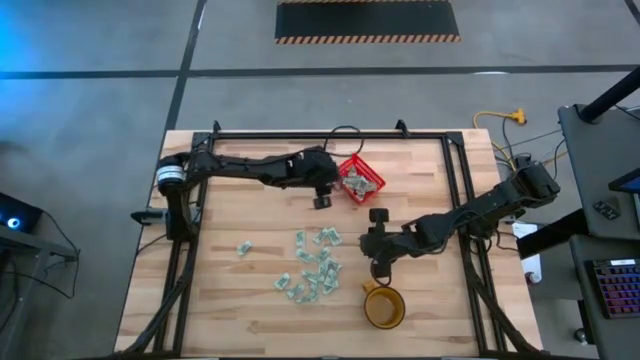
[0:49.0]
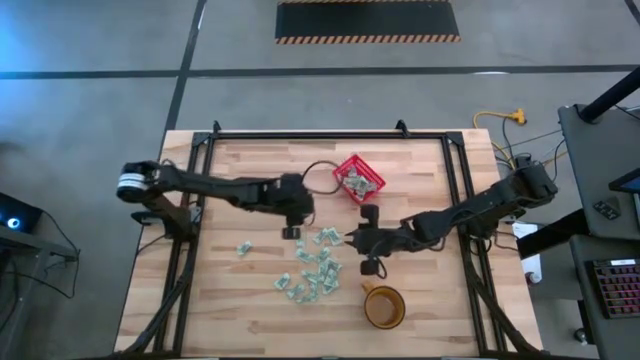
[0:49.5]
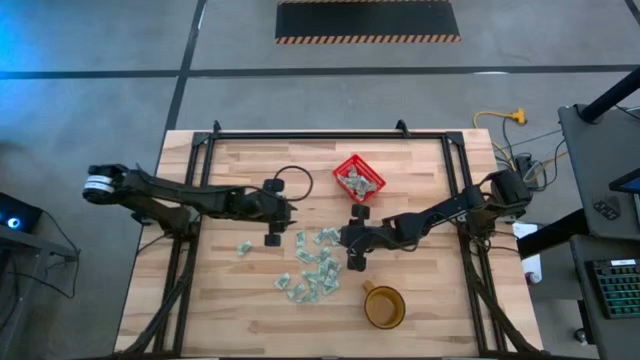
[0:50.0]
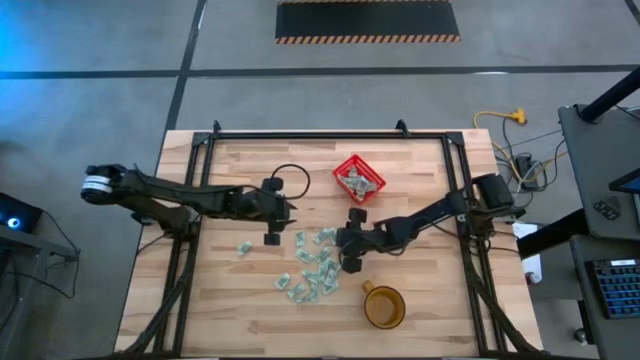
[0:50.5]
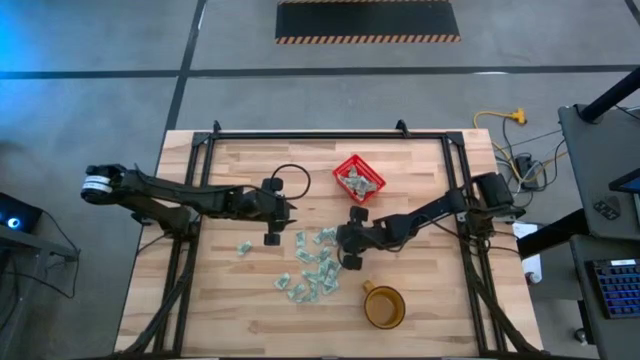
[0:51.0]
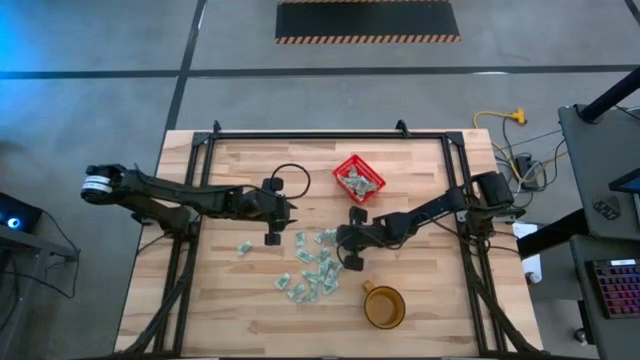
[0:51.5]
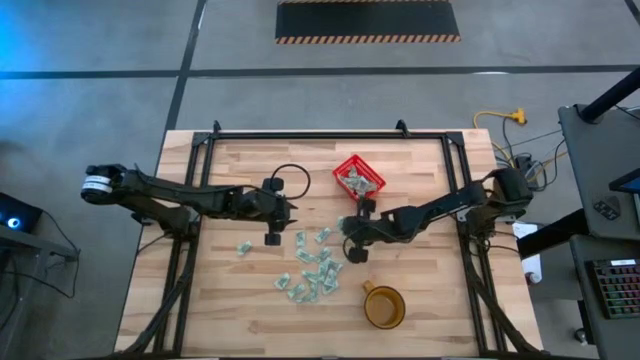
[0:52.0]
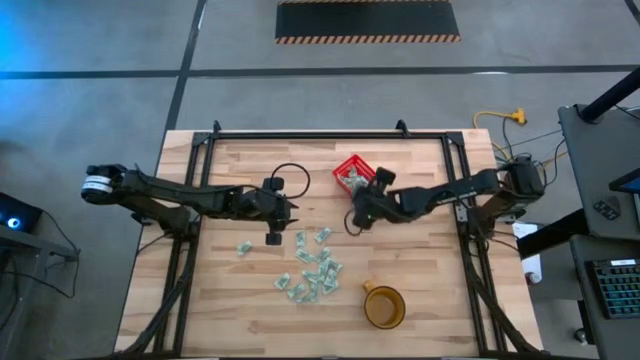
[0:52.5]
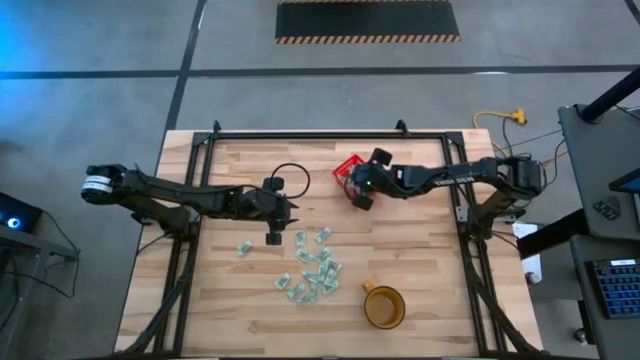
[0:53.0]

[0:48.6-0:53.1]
Task: Pick and place Stevia / Truvia into bins
Put the stevia packet into the red basket

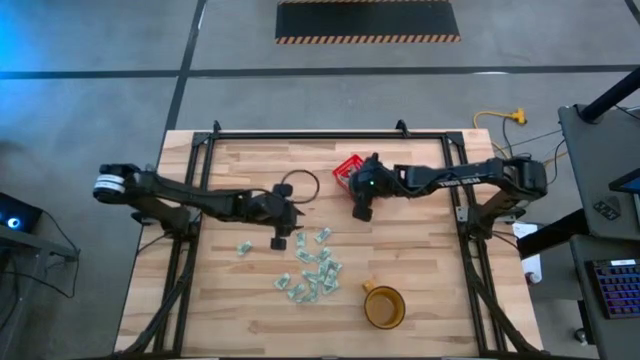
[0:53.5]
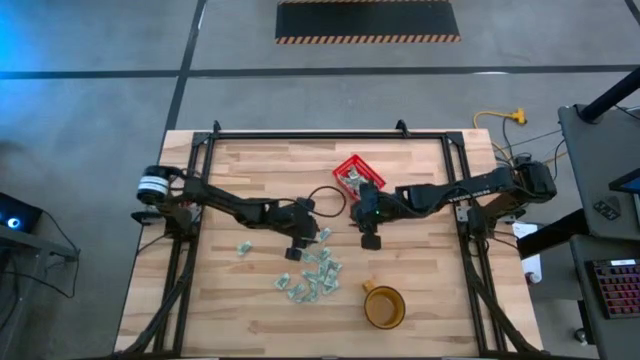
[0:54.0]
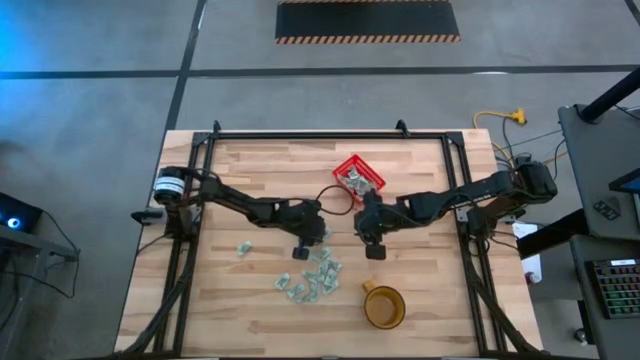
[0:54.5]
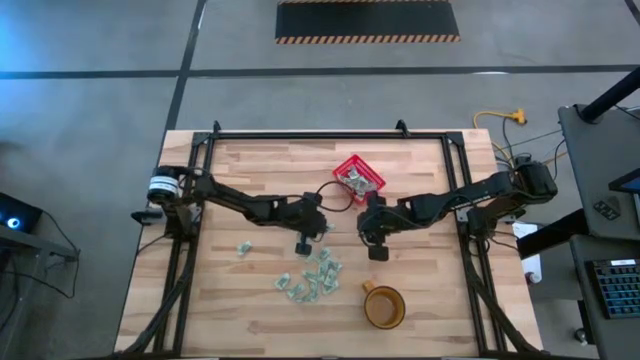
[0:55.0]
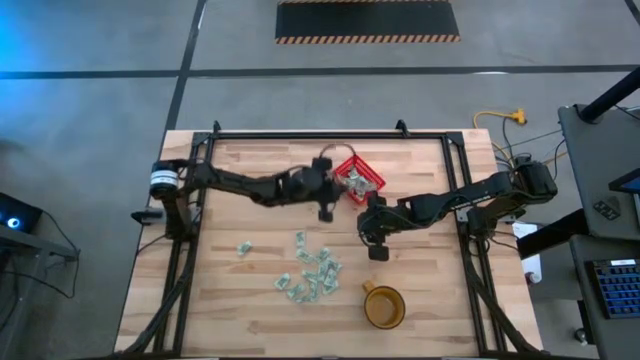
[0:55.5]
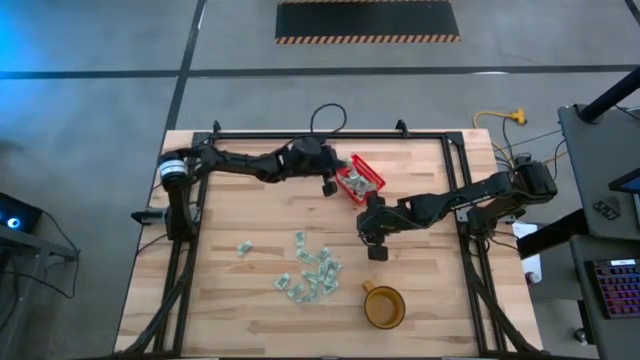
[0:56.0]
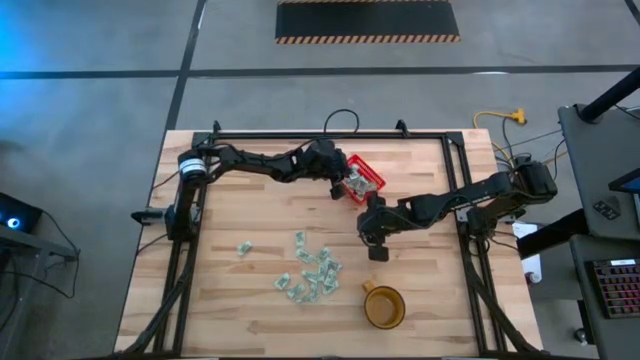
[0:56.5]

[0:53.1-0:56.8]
Put the stevia packet into the red basket

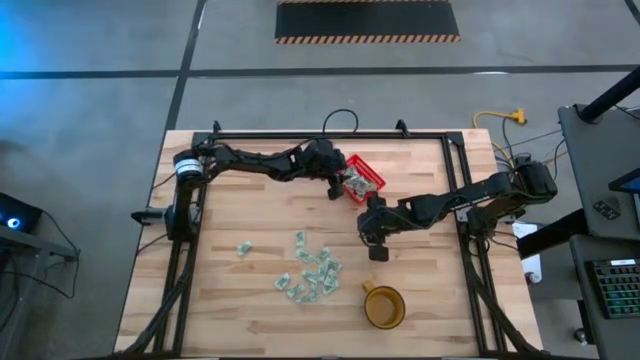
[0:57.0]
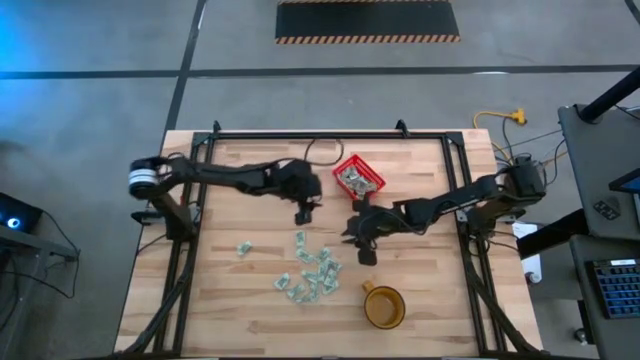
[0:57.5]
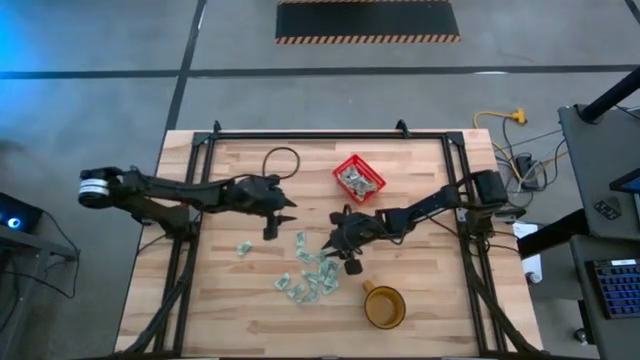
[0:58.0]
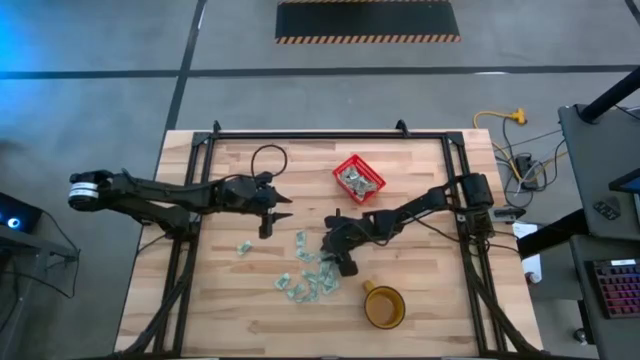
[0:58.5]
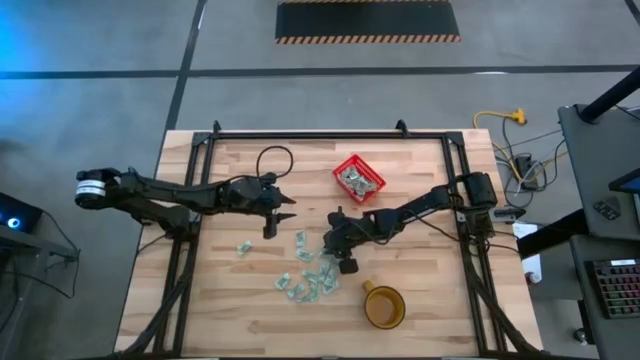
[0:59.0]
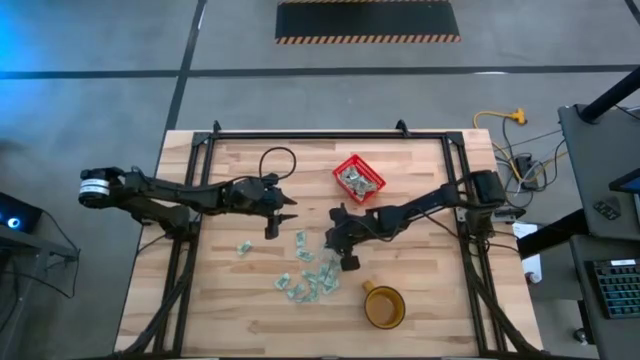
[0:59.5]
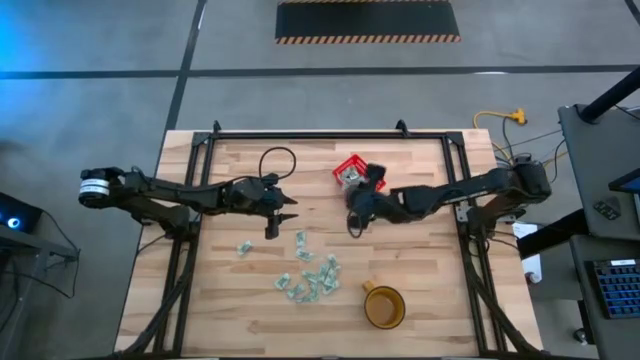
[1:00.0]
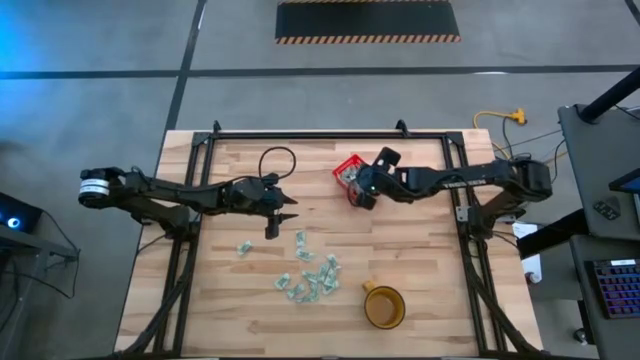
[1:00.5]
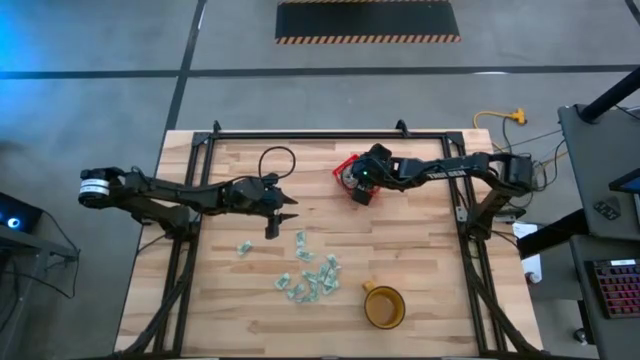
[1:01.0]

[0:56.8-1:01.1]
Put the stevia packet into the red basket

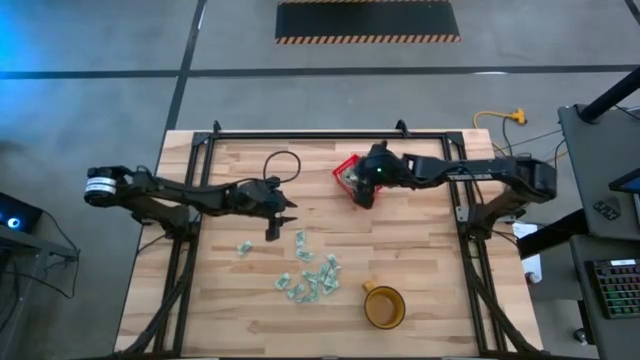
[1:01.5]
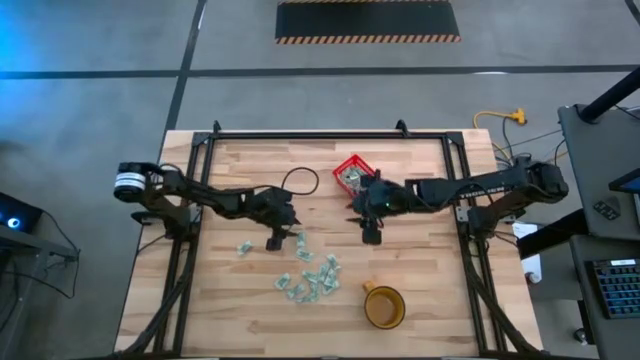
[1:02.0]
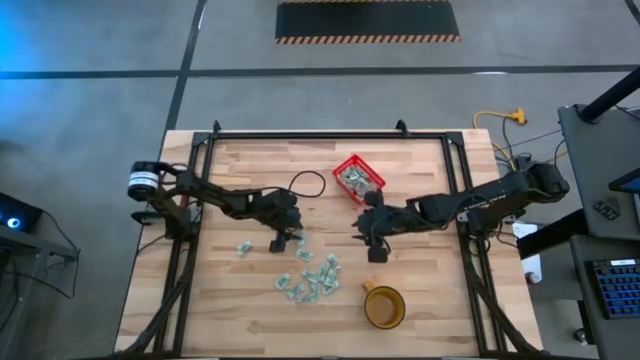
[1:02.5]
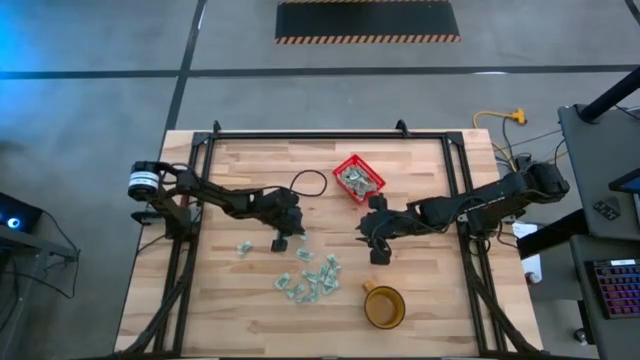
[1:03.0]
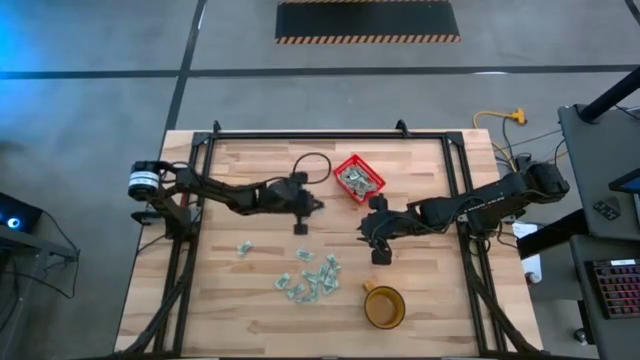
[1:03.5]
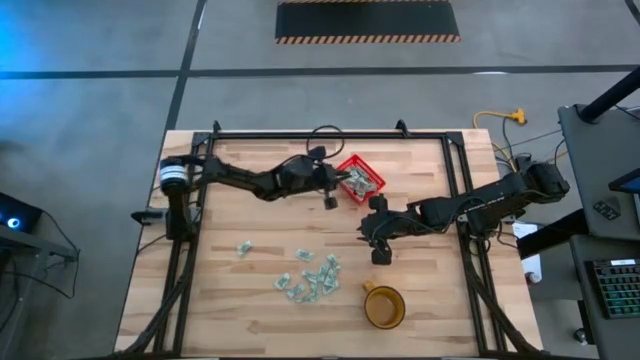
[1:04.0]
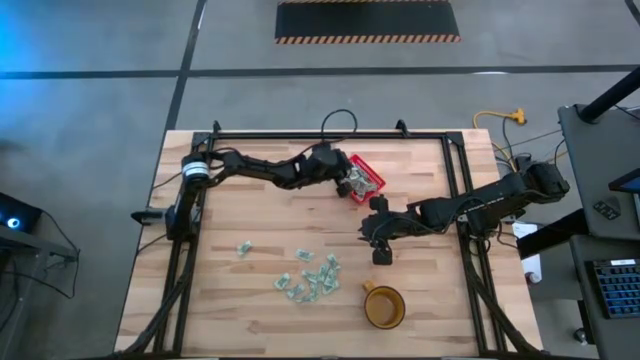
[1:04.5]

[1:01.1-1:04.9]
Put the stevia packet into the red basket

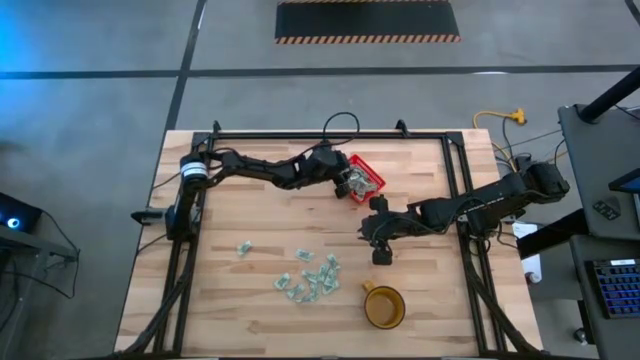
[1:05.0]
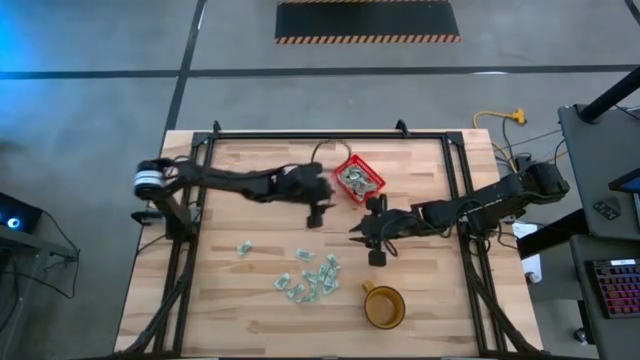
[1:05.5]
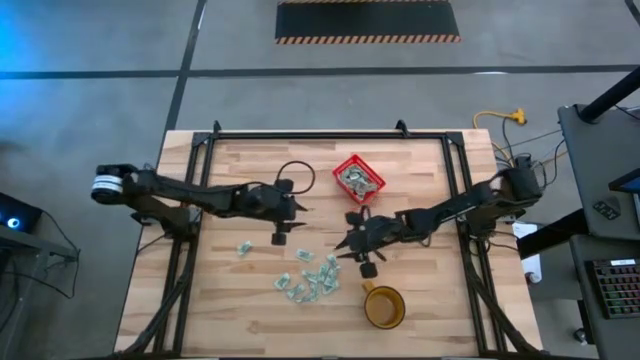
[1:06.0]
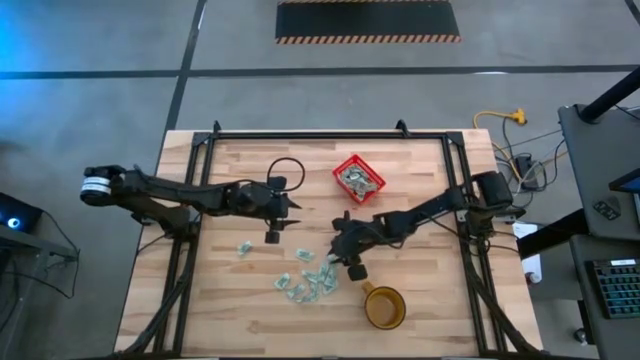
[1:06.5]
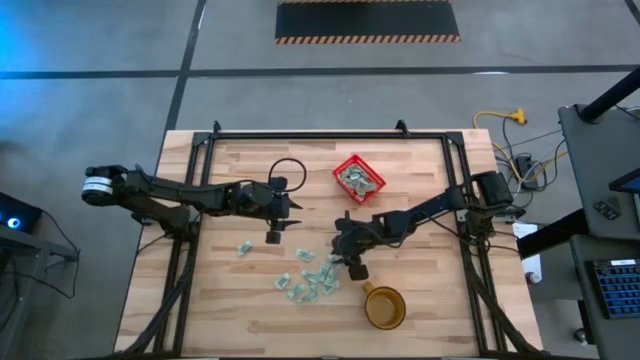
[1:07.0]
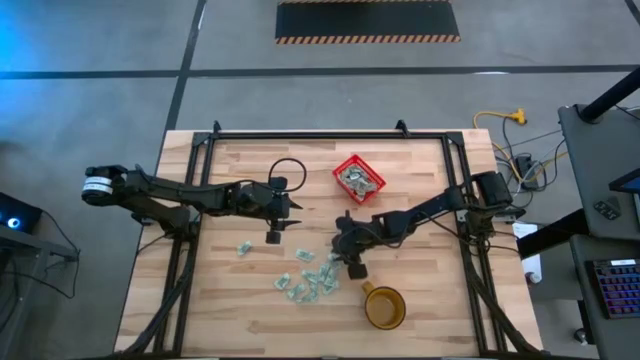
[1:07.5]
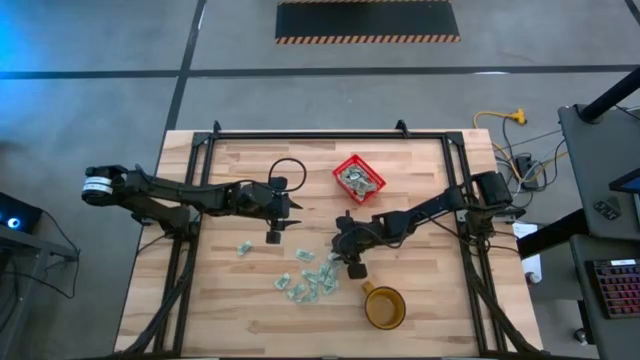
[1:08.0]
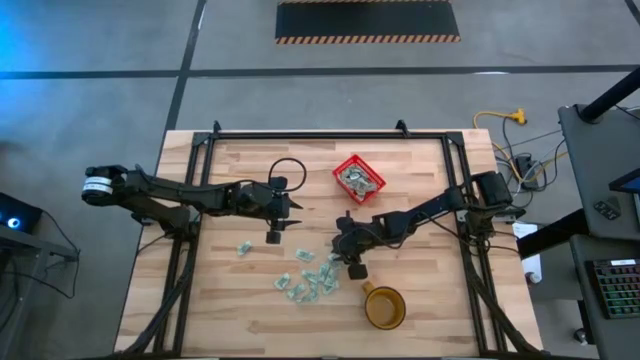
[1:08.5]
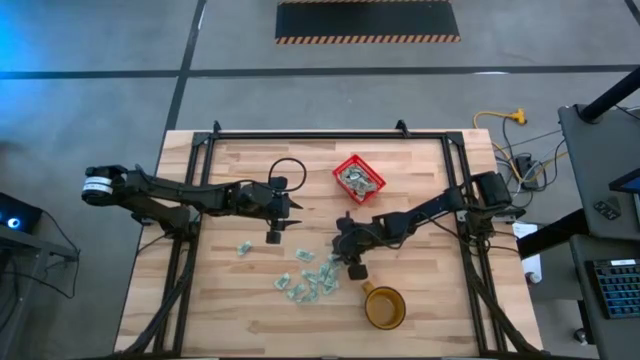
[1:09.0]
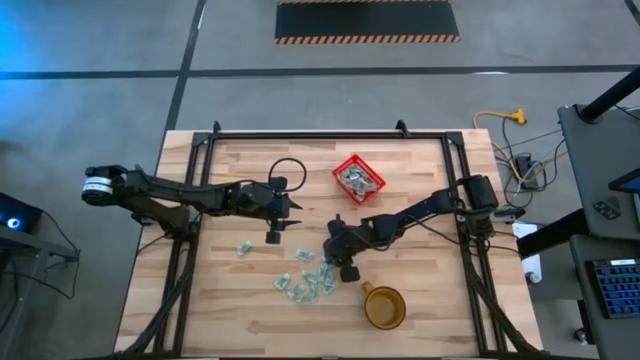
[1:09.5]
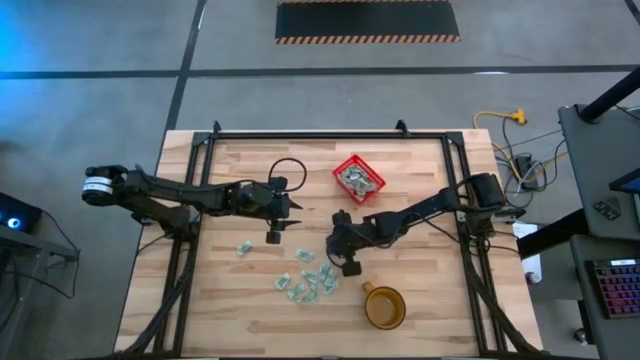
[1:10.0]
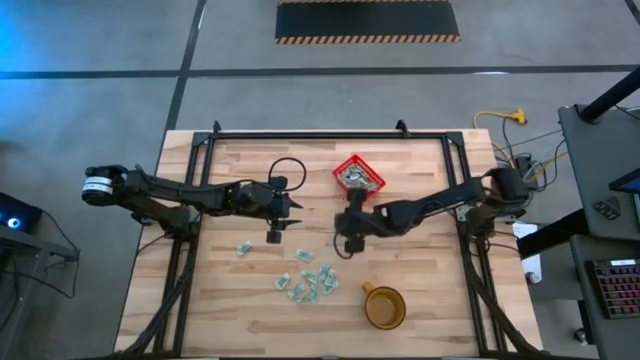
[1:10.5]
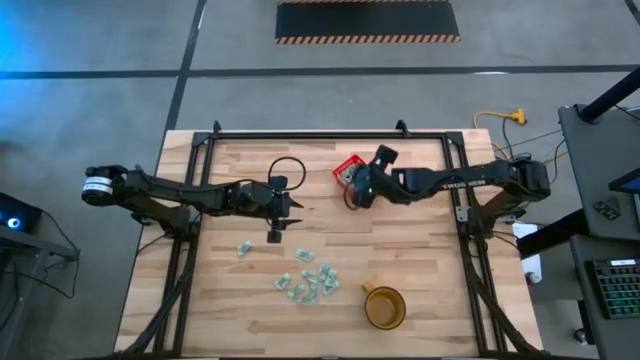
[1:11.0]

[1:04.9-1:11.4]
Put the stevia packet into the red basket
